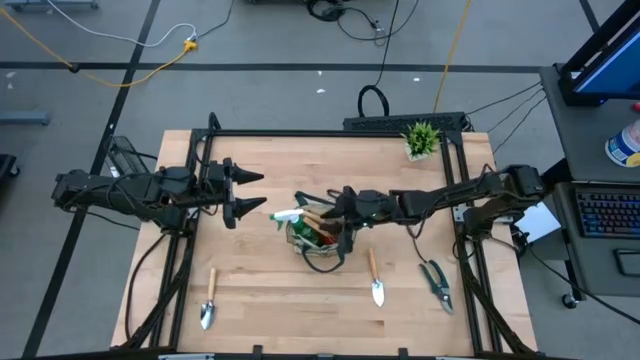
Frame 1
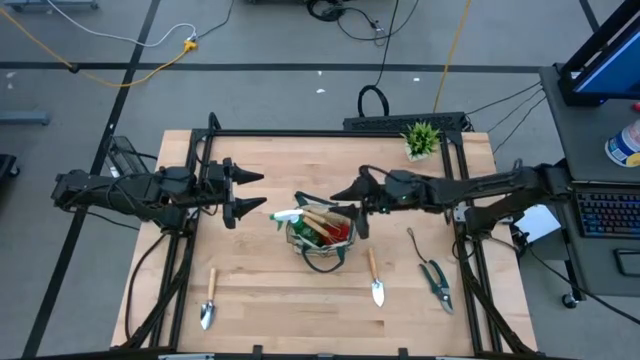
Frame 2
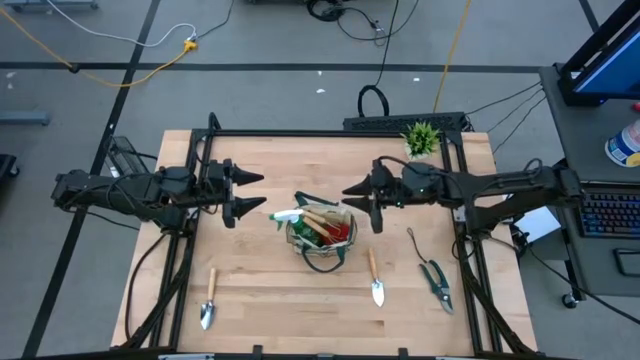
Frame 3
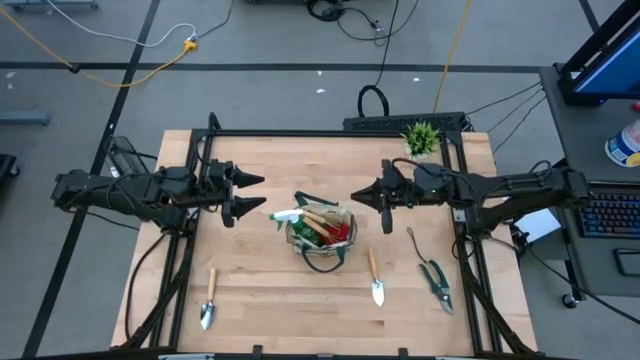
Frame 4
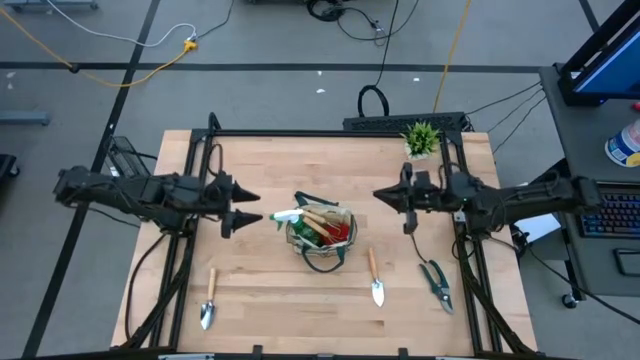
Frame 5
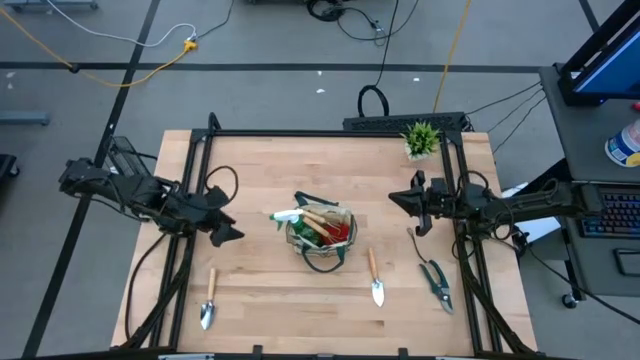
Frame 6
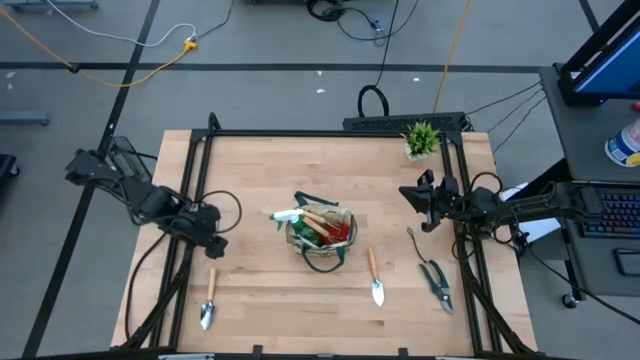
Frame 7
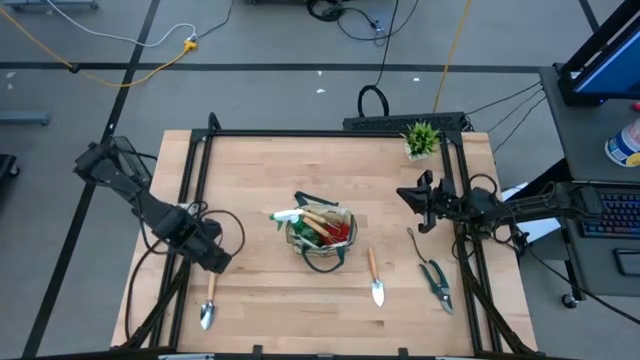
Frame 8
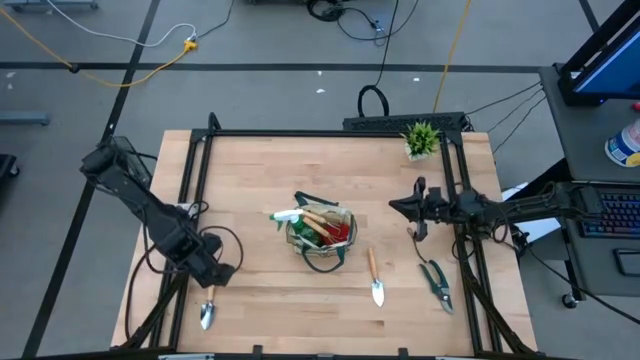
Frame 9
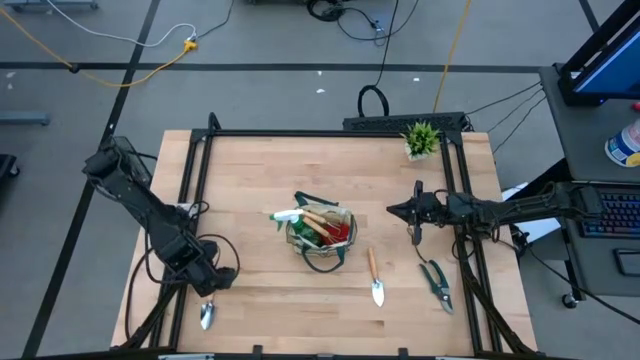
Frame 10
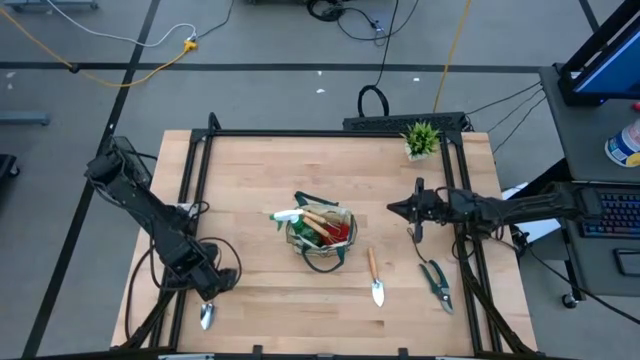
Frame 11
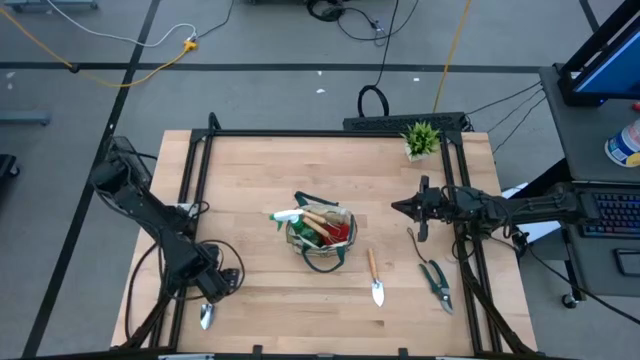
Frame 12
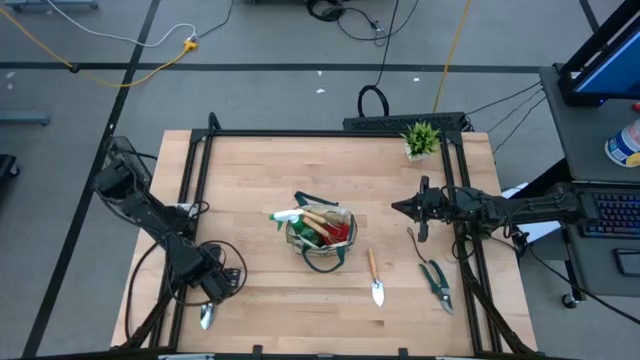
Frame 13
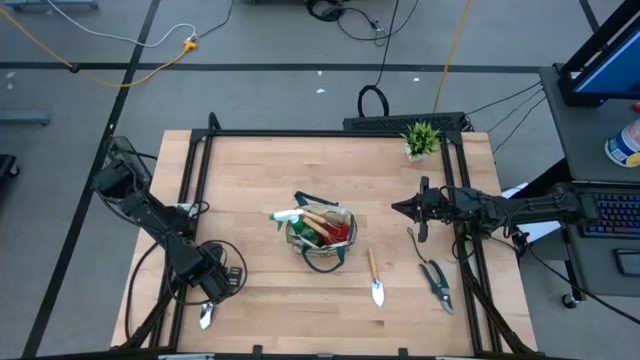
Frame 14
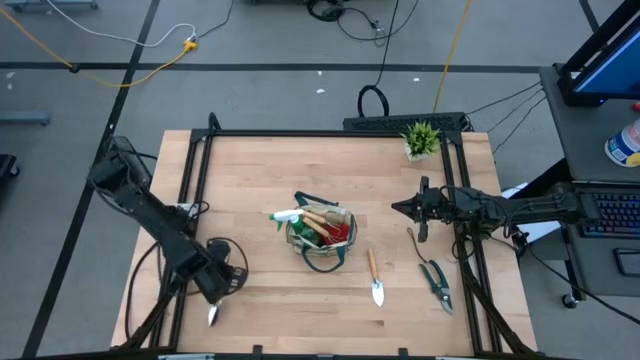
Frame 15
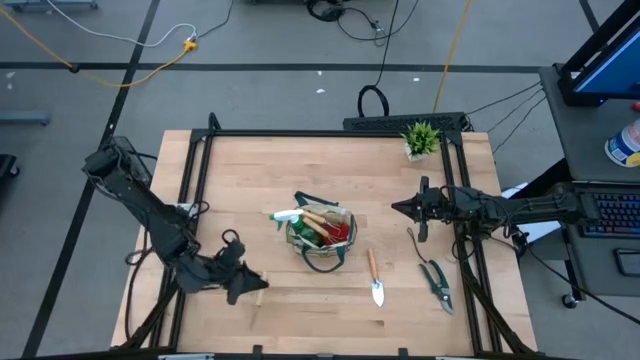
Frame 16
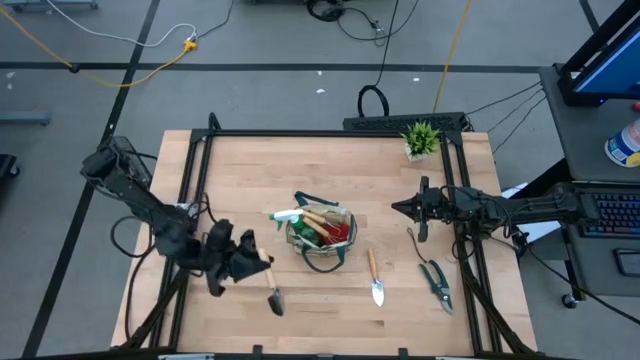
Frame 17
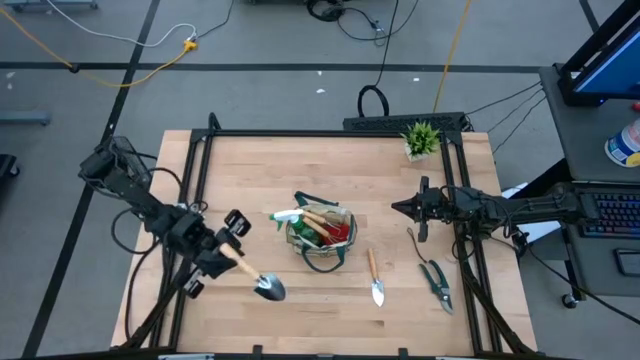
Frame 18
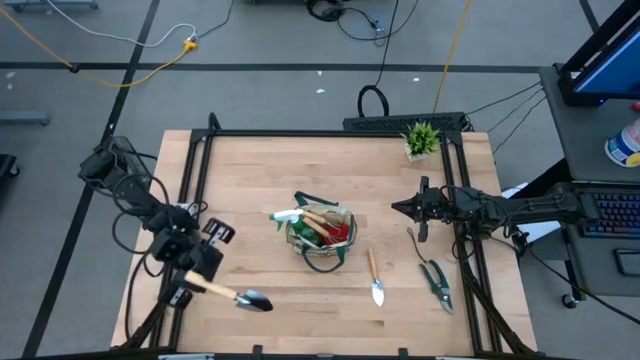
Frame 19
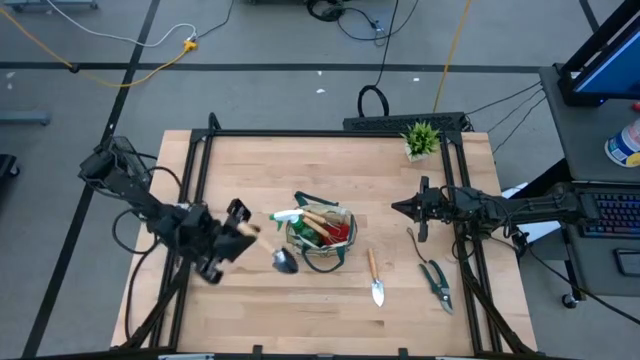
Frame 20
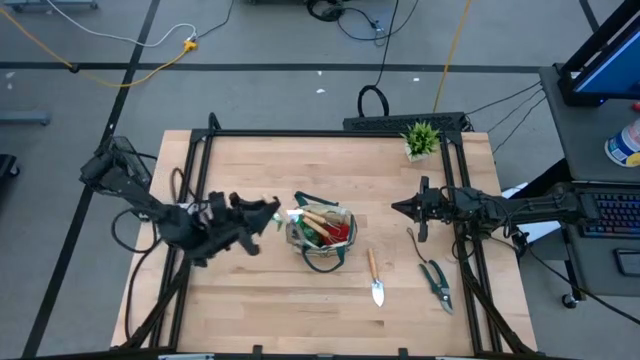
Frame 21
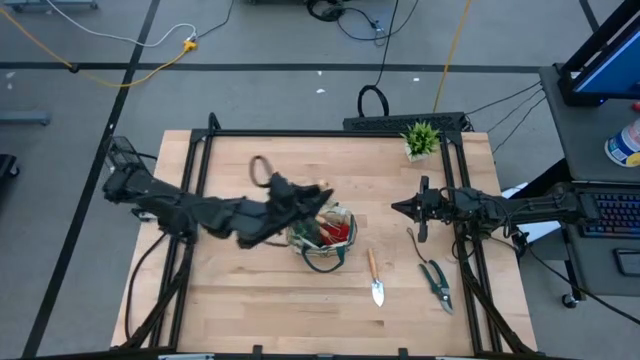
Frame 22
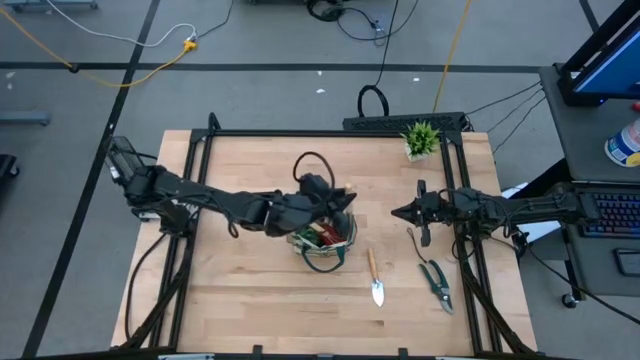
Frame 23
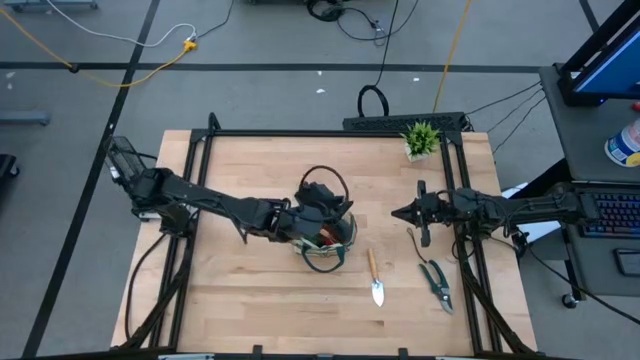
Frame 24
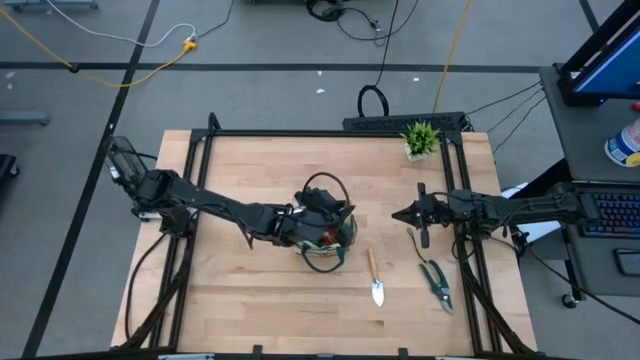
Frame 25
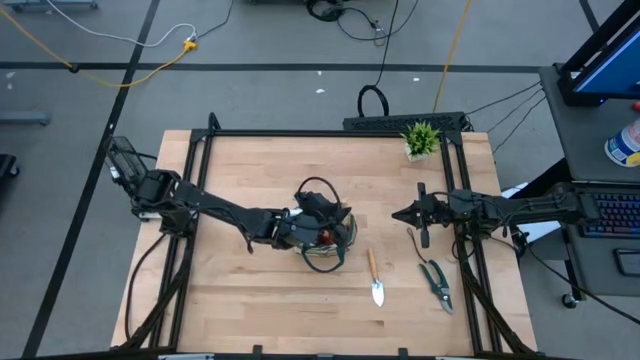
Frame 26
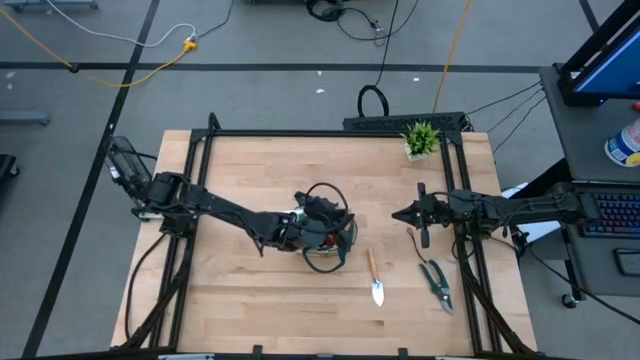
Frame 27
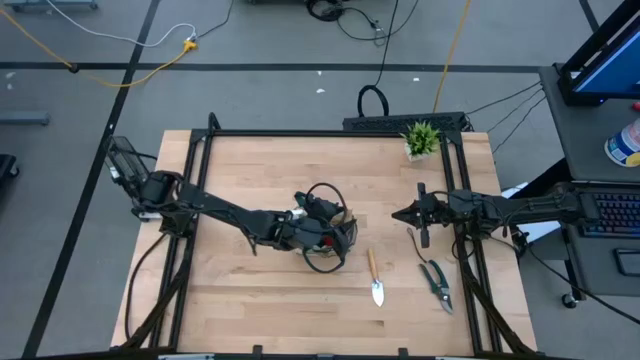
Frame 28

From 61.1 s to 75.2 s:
Task: Pick & Place Garden tools in Gardening bag
Put the left brown trowel into the gardening bag

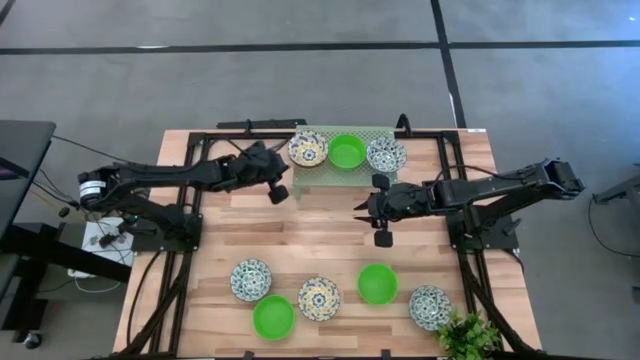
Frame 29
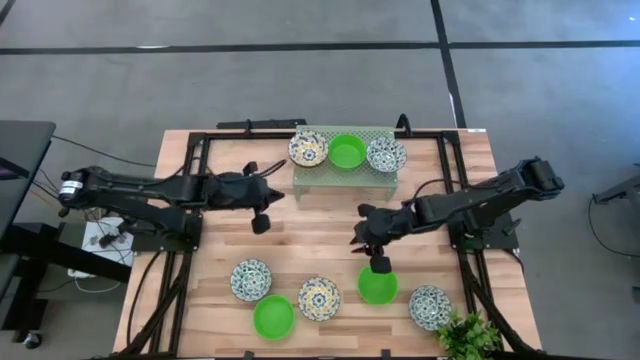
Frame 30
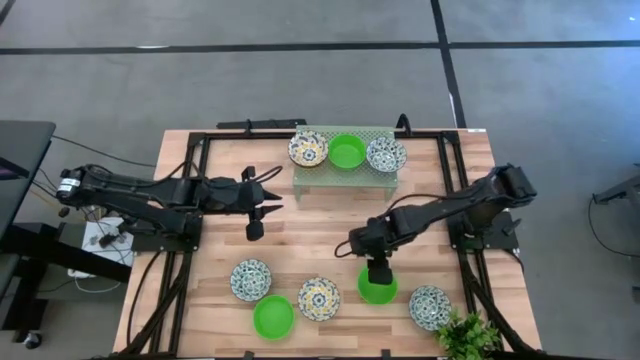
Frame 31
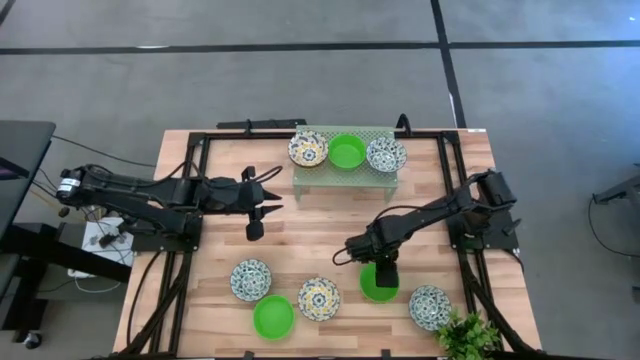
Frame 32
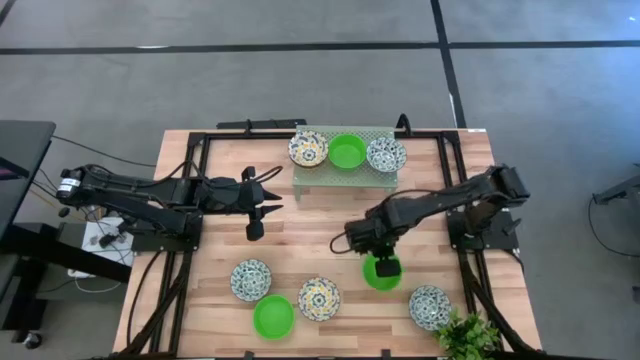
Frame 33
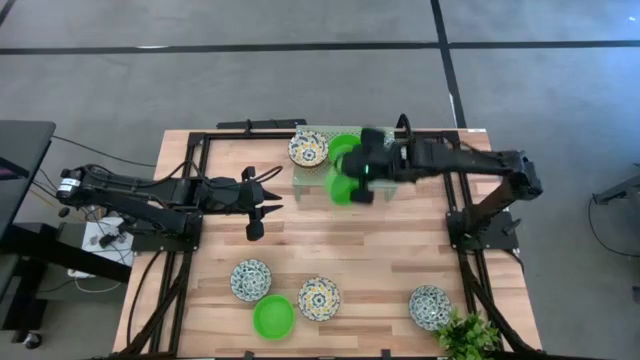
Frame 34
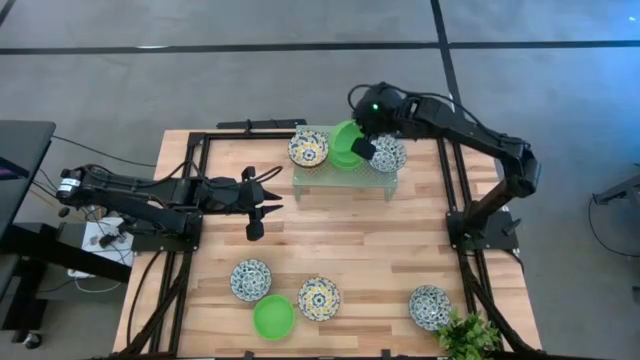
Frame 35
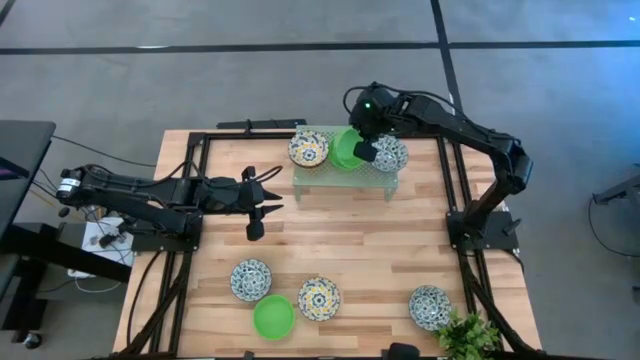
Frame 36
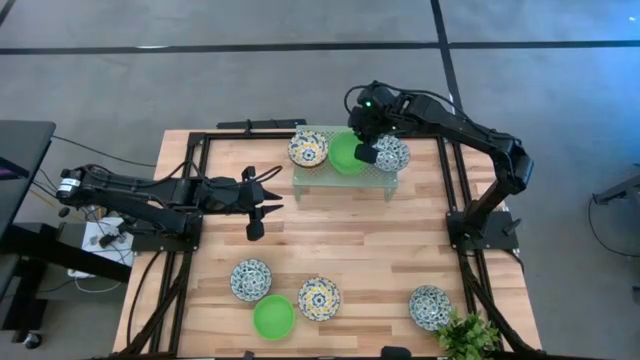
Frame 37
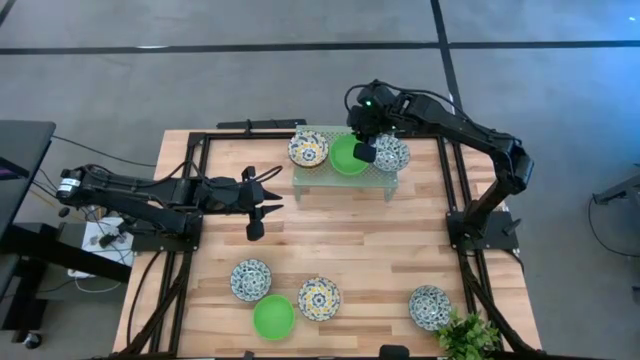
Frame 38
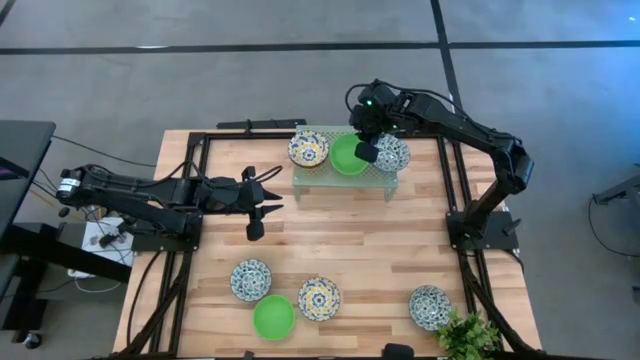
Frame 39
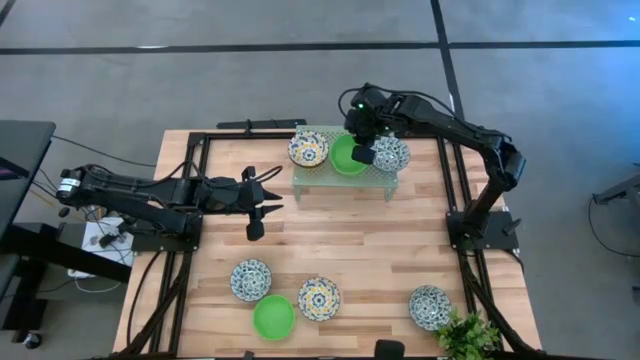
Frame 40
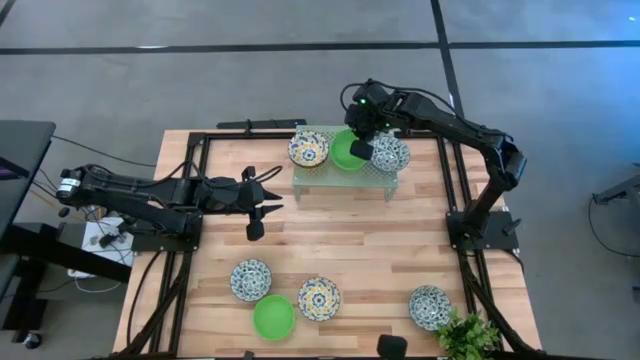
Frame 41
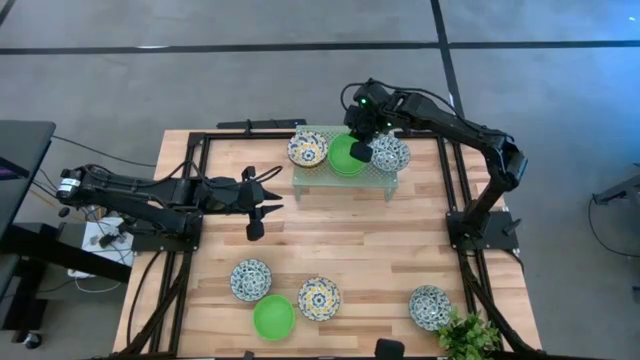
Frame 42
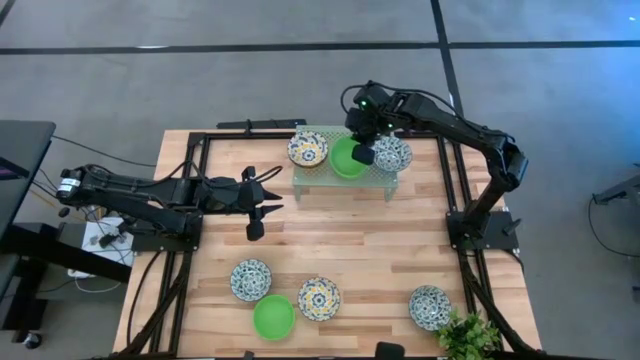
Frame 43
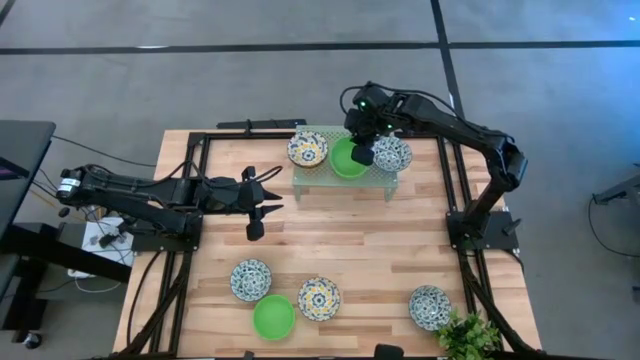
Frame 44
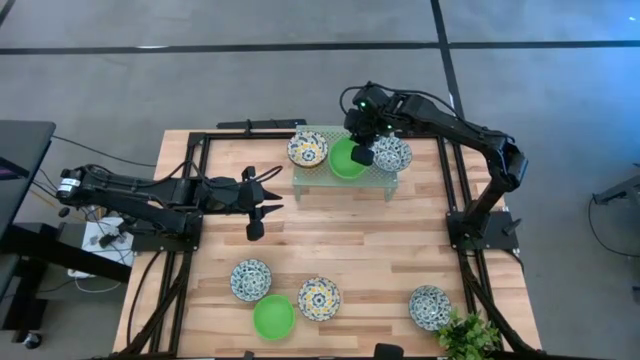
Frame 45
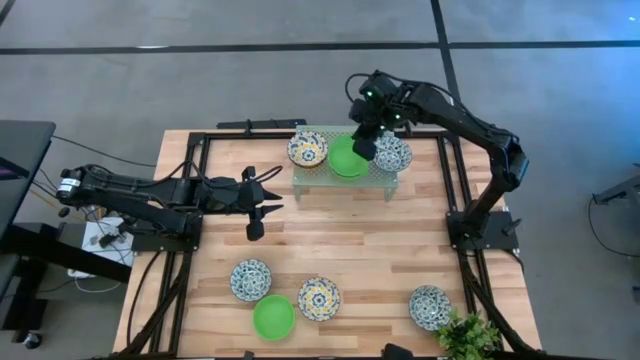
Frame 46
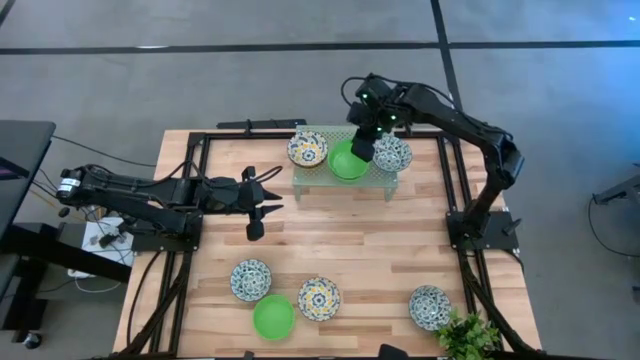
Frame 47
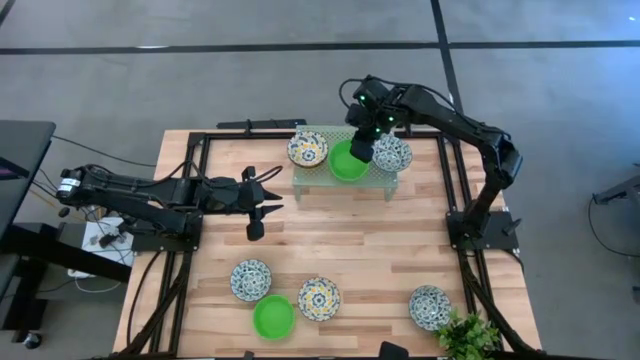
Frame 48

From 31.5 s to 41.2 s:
Task: Pick & Place Mini bowls
Stack the left green bowl on the green bowl on the shelf
